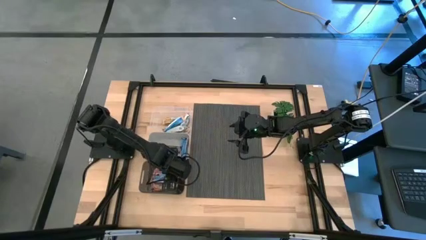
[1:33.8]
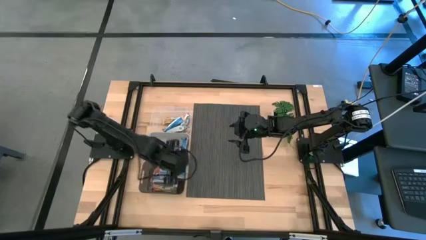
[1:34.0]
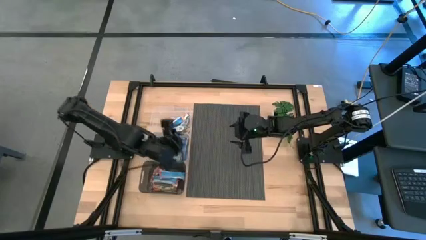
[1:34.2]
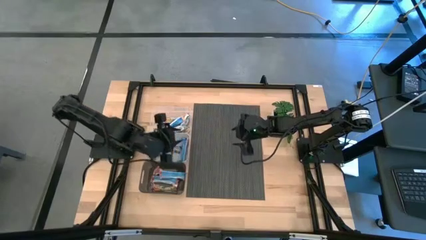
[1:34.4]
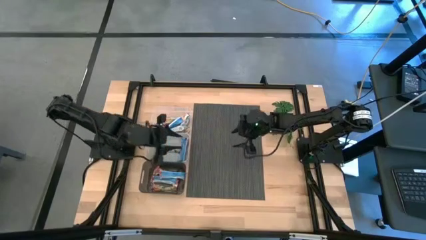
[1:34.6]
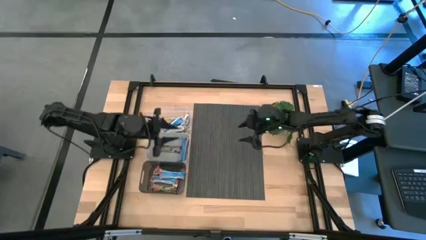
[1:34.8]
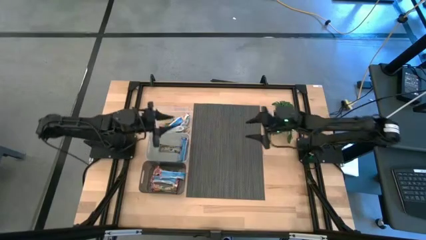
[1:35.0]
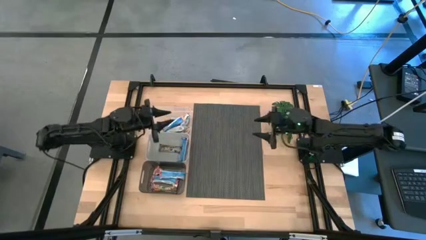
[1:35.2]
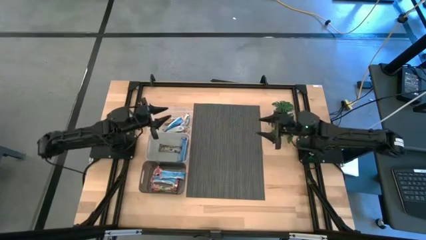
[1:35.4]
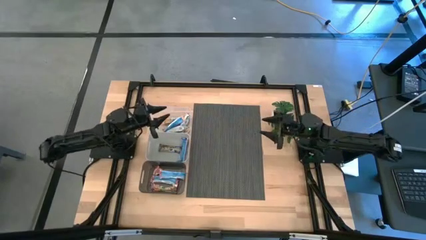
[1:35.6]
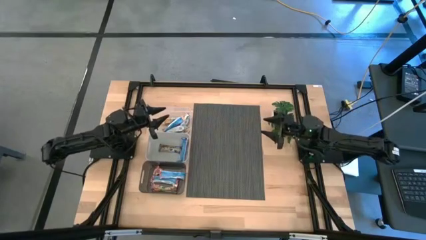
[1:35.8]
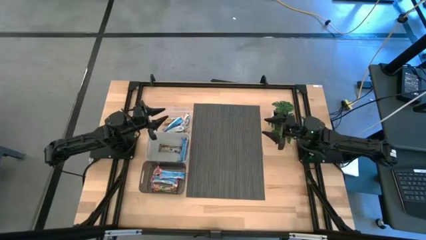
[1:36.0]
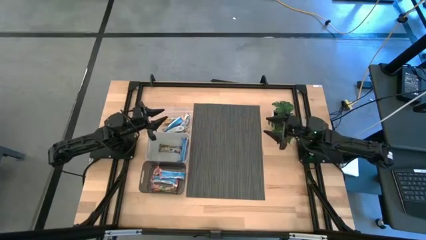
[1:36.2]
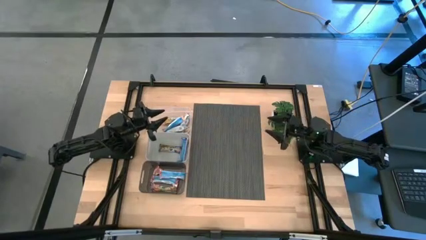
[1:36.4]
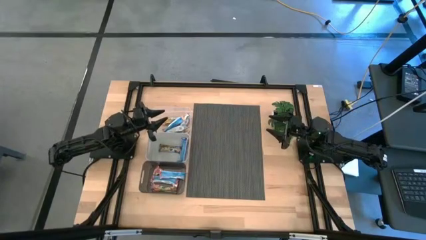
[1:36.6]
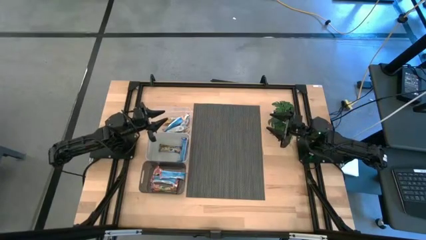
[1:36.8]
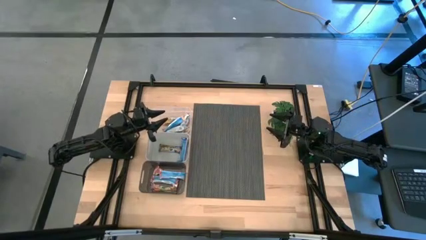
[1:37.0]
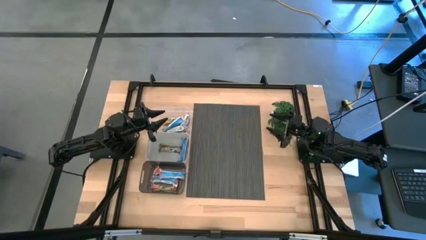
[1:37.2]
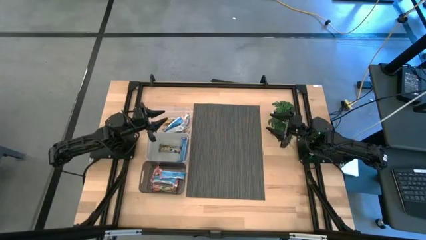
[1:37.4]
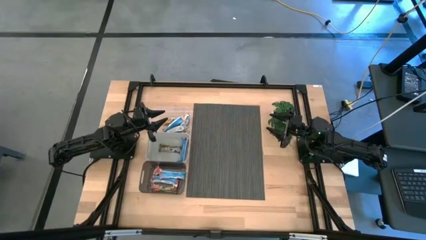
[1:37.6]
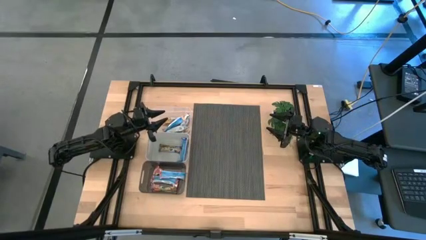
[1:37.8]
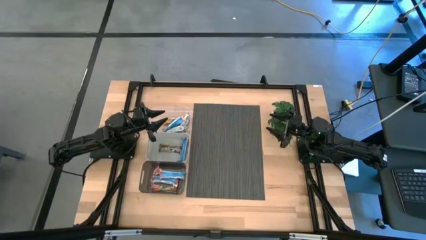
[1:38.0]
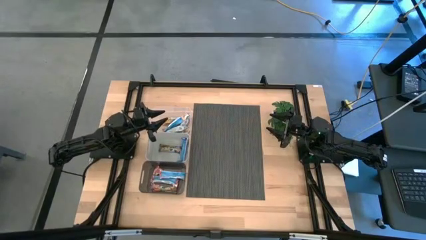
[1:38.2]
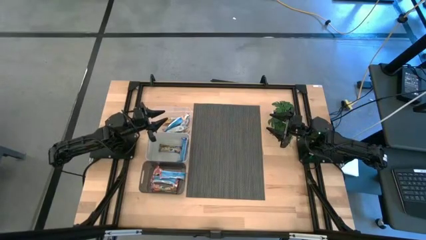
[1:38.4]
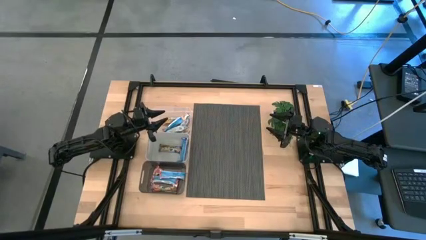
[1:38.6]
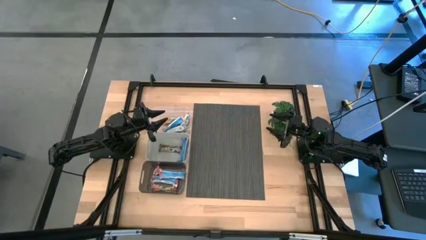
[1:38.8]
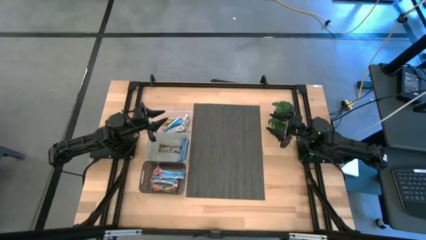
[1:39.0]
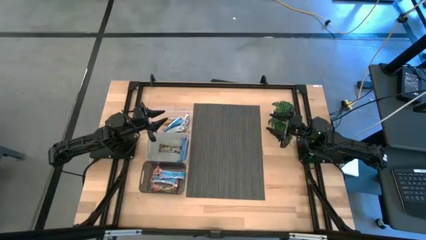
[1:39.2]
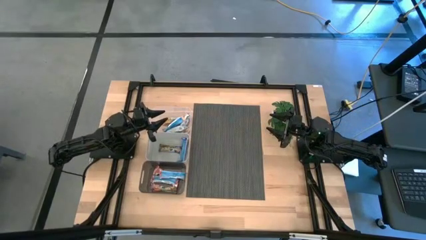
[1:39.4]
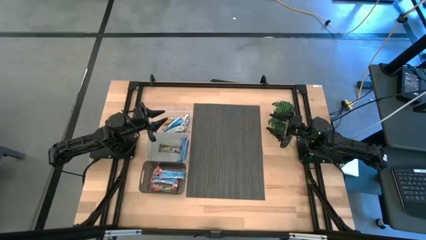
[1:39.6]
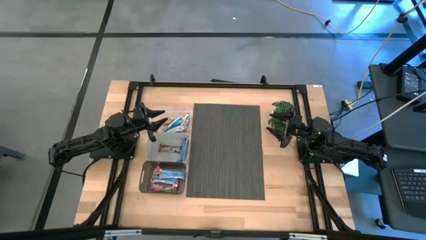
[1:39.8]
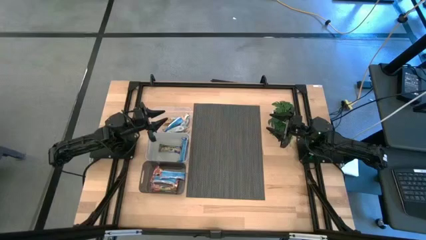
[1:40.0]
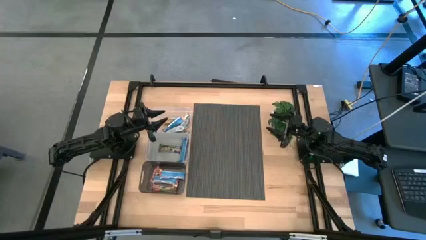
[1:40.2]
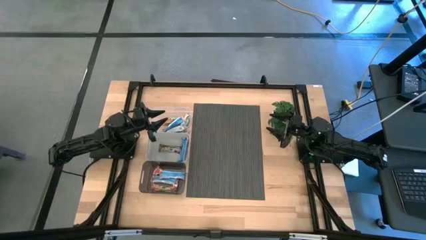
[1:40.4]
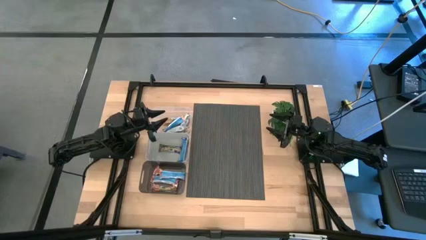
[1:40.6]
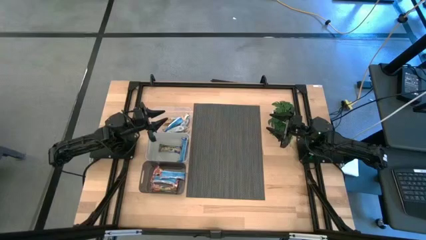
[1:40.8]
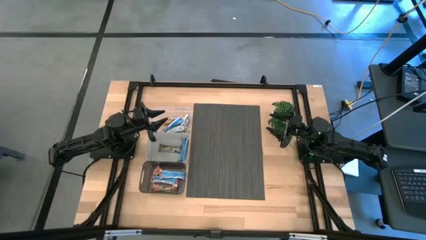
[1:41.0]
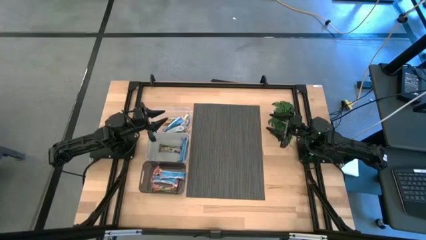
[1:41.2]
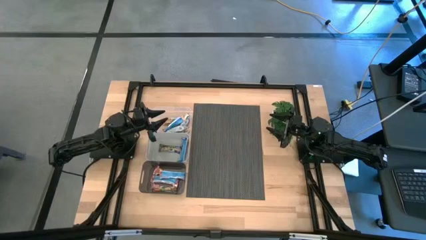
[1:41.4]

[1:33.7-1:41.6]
Task: Pick and place Granola Bars by type
Return to Home Position

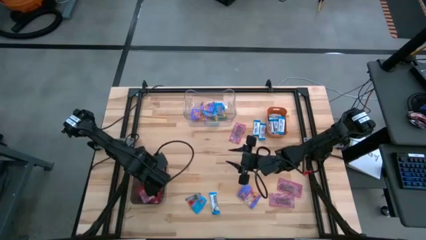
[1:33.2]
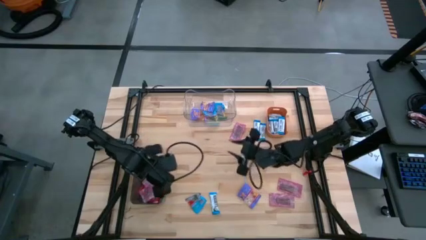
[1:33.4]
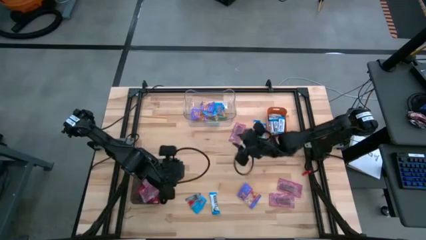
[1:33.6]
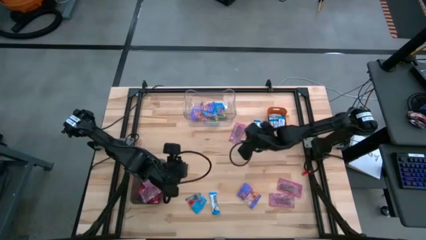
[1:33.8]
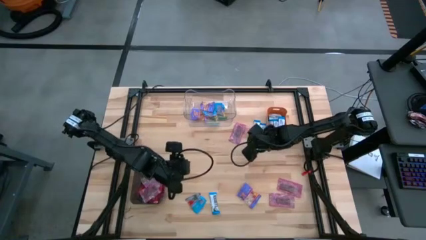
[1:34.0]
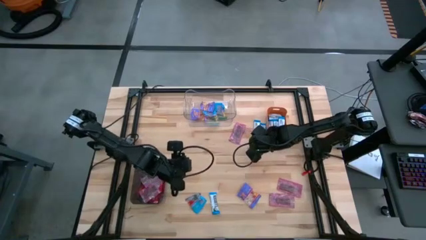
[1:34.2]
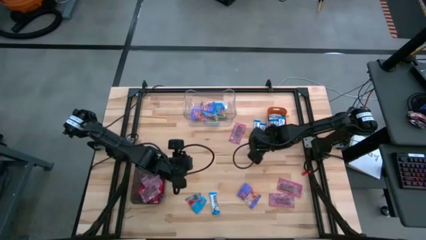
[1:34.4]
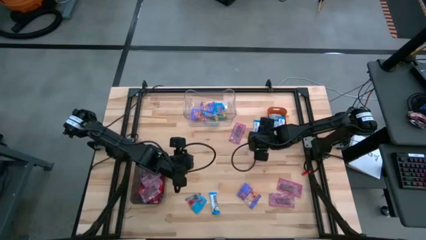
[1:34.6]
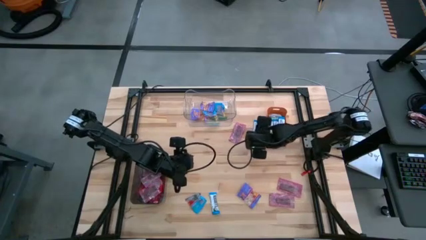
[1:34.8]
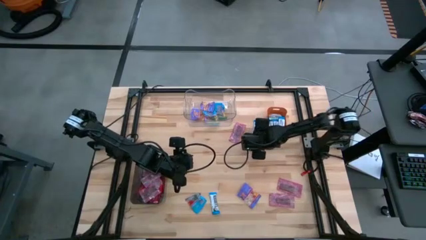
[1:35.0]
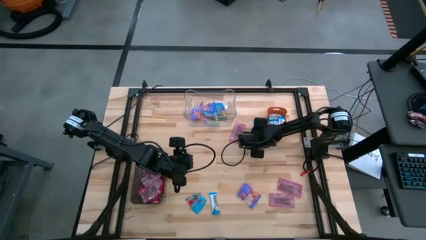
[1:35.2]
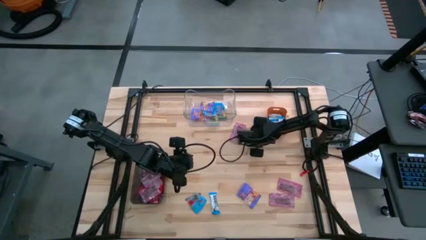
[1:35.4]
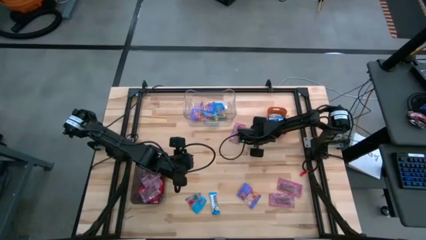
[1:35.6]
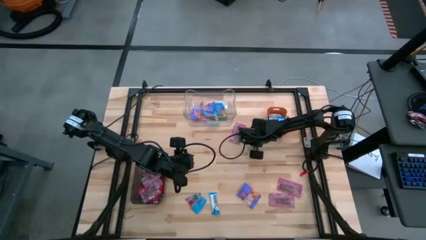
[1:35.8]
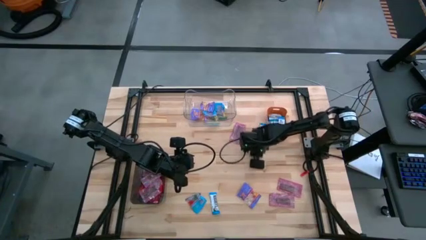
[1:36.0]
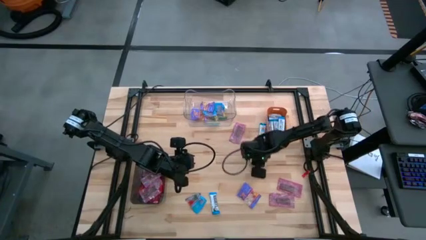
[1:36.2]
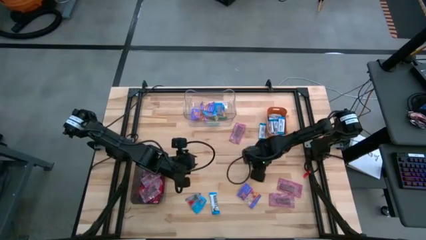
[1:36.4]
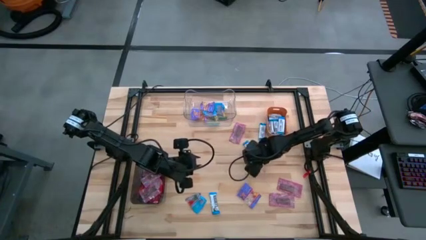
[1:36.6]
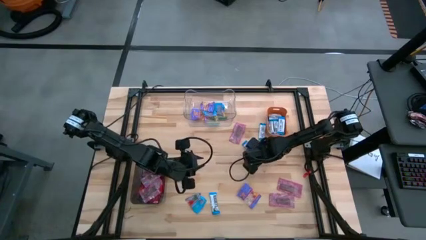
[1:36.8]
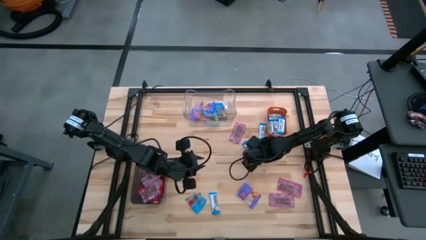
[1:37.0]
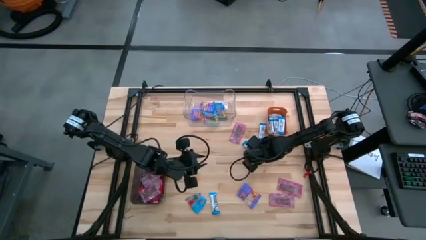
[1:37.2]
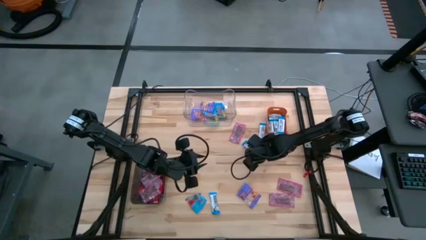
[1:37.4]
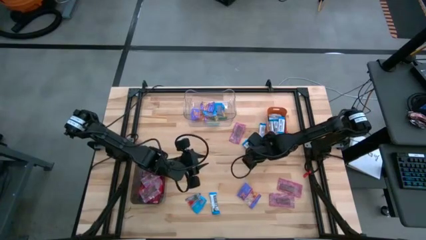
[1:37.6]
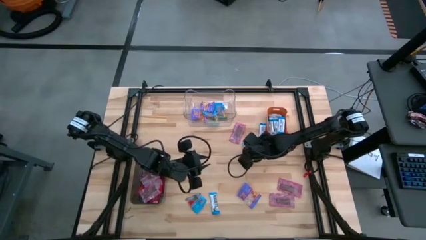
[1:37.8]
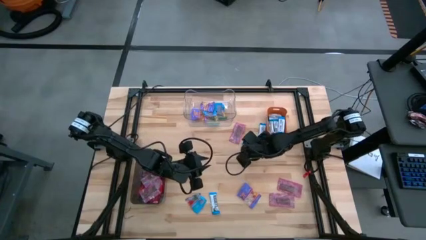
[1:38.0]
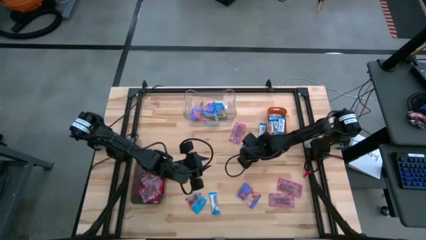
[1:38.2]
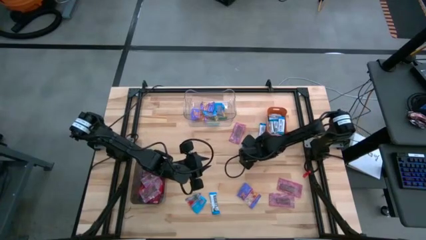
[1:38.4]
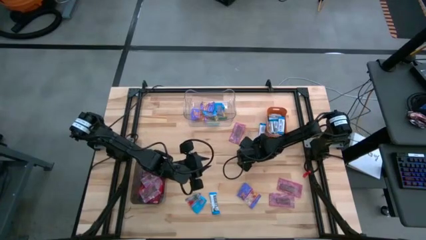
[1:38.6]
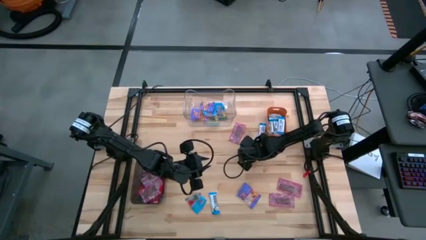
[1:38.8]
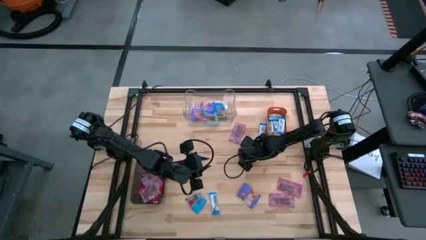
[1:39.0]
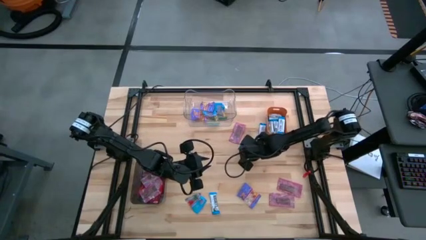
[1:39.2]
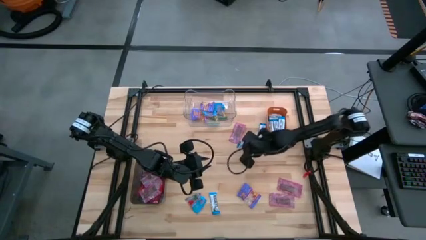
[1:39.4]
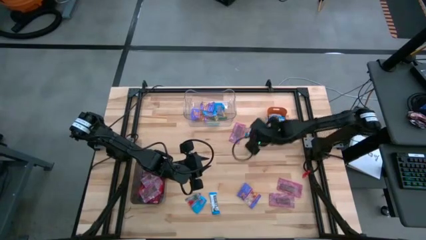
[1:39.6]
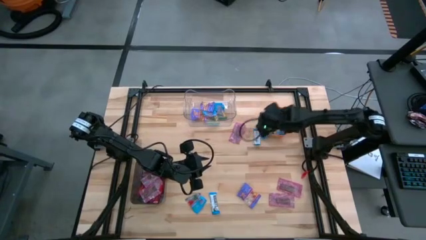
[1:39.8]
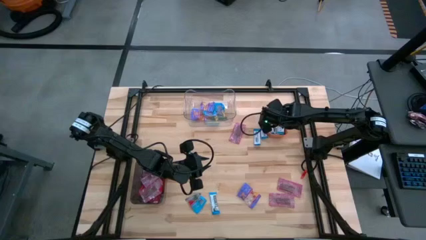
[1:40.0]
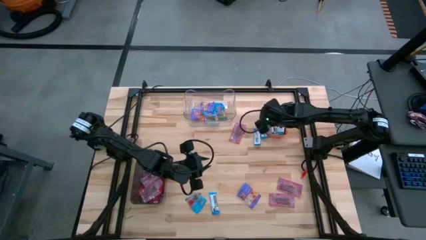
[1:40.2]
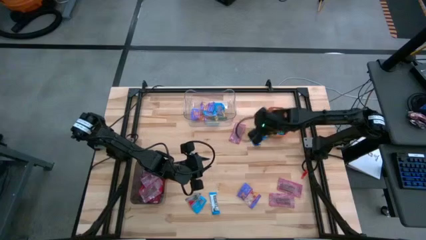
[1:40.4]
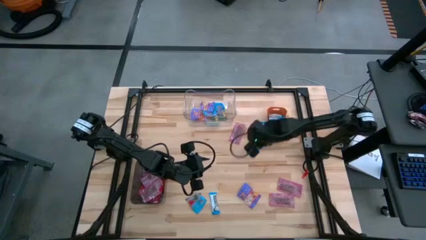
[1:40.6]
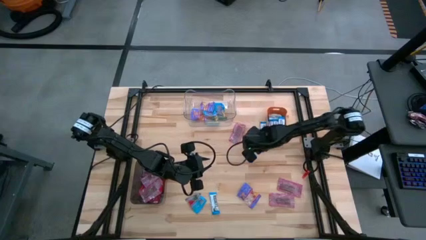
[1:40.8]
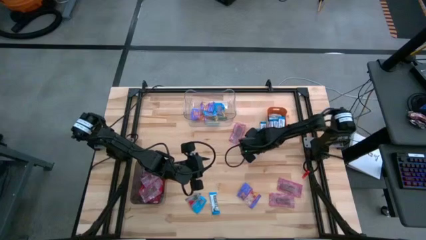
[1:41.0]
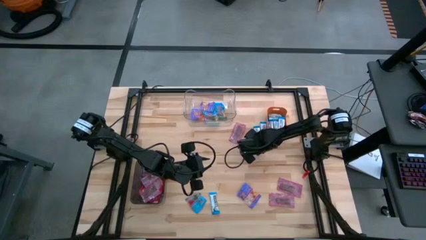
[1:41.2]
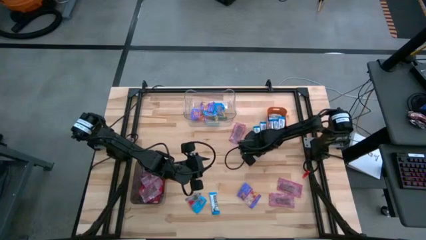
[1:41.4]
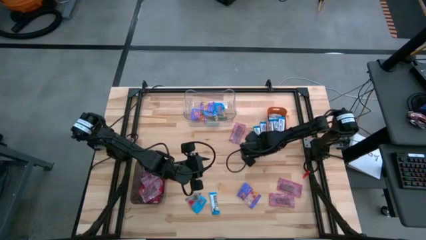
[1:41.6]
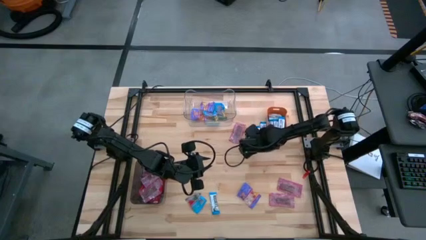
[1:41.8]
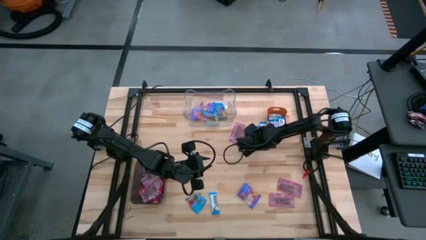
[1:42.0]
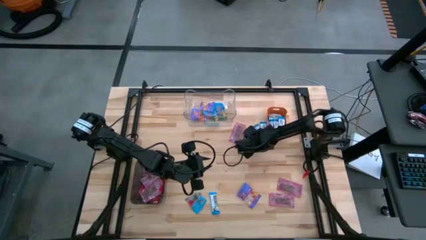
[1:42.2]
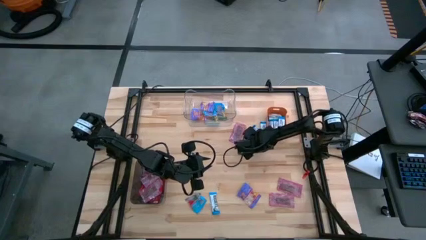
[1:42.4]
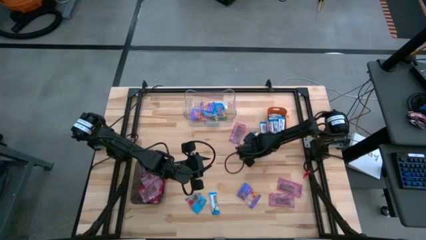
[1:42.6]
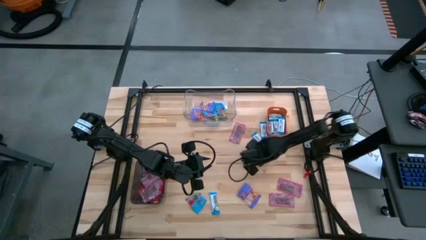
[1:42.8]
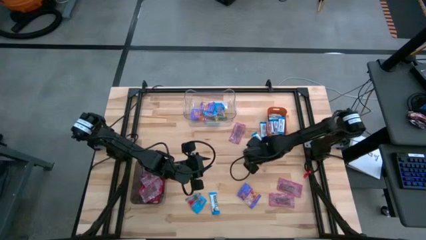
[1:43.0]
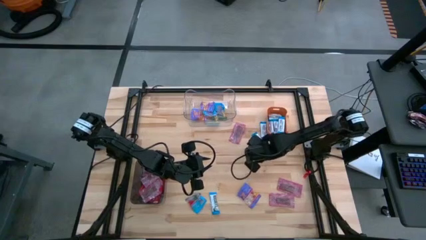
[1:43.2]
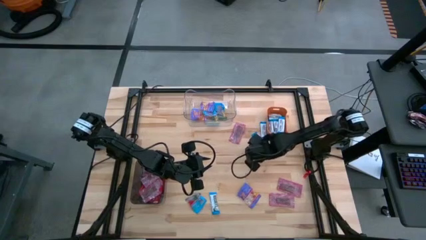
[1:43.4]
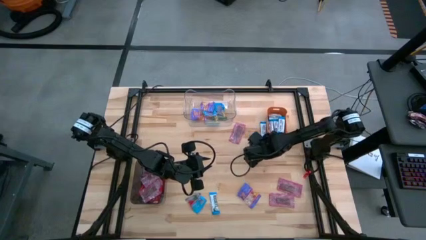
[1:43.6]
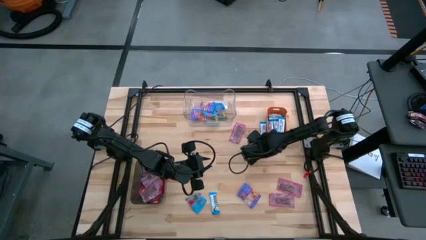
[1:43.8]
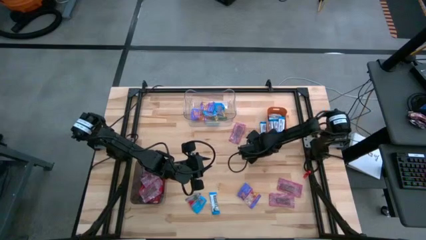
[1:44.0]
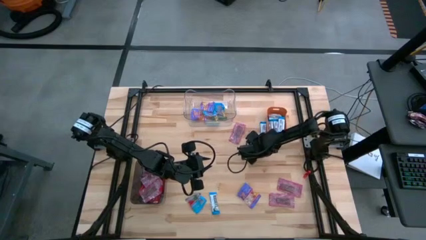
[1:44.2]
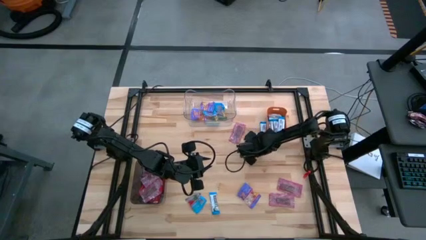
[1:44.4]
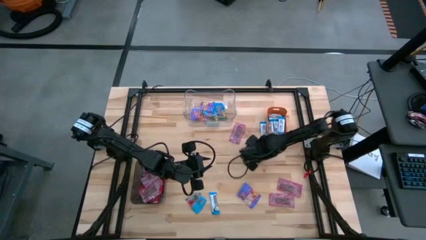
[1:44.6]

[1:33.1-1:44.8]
Task: Sort candy
Put the white chocolate into the orange bin
